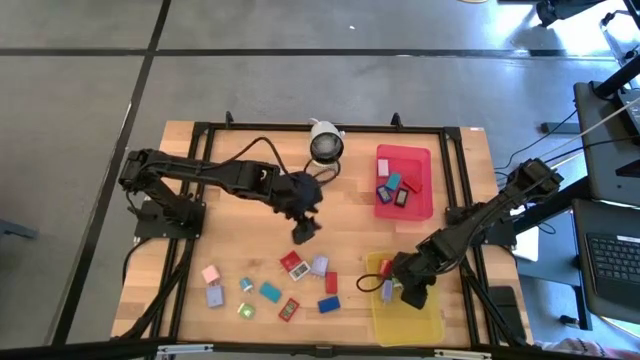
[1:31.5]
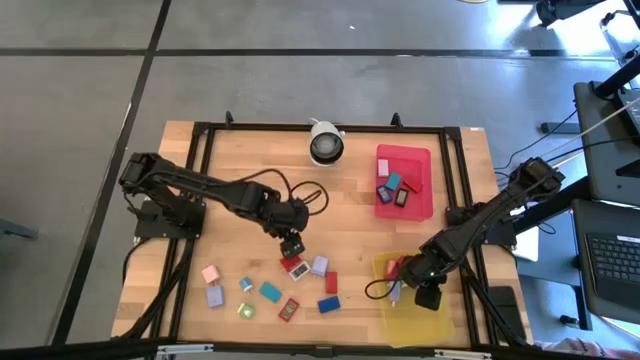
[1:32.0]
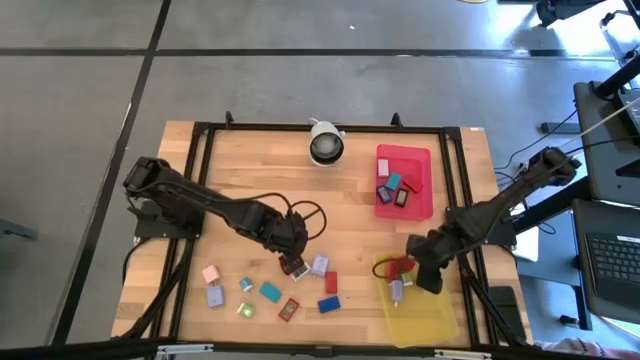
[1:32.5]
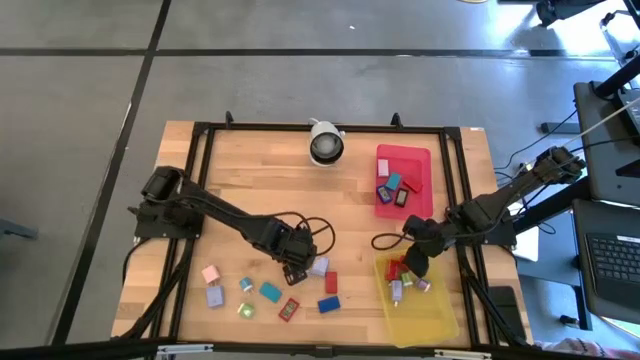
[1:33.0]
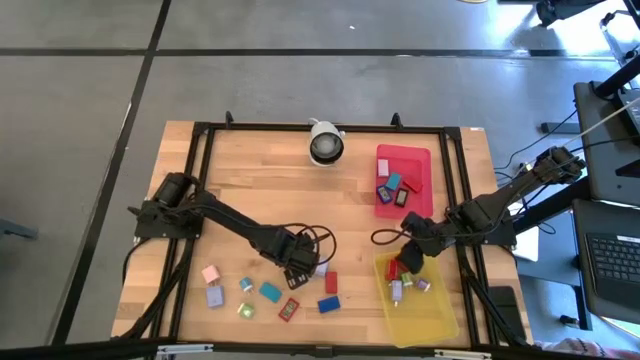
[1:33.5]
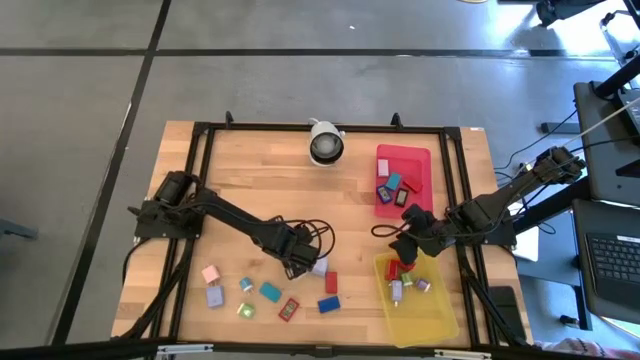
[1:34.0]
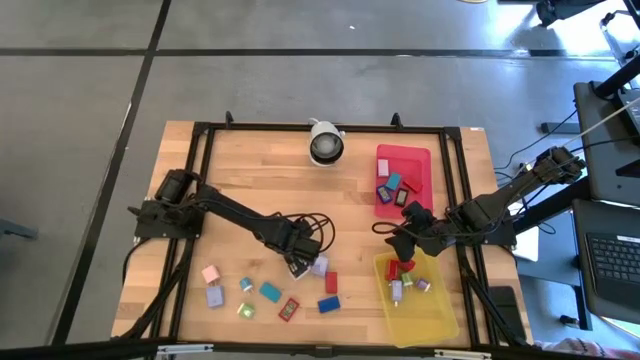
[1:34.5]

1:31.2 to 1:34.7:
Task: Pick & Place Office items
Put the red charger adapter into the yellow bin

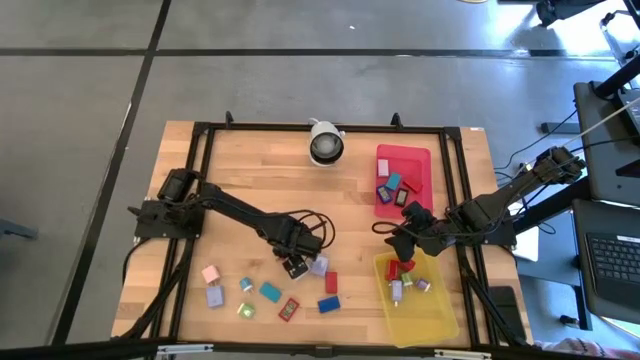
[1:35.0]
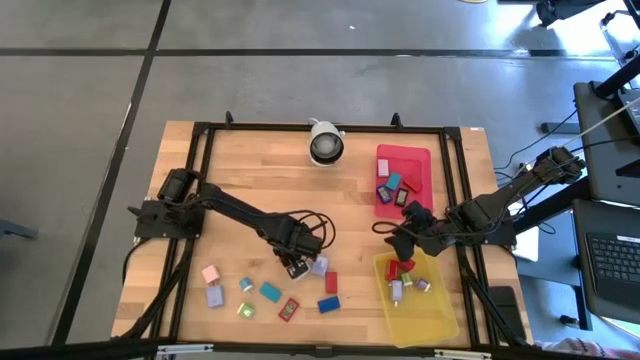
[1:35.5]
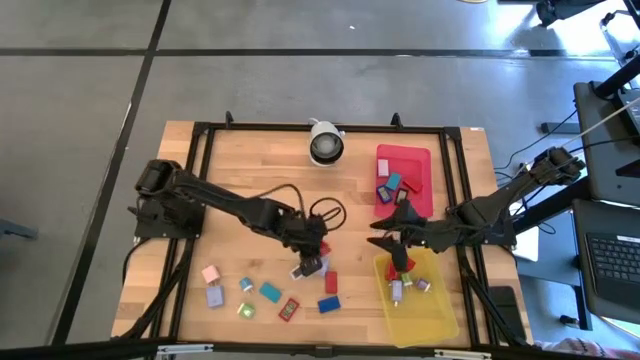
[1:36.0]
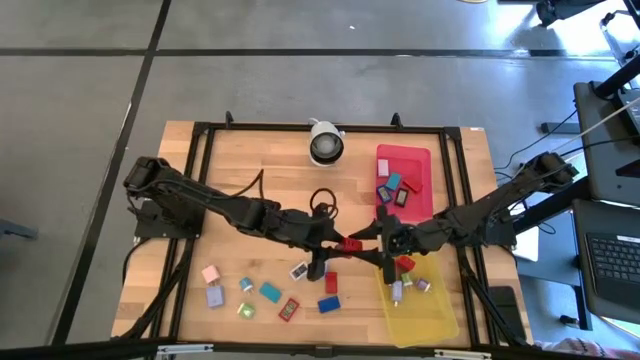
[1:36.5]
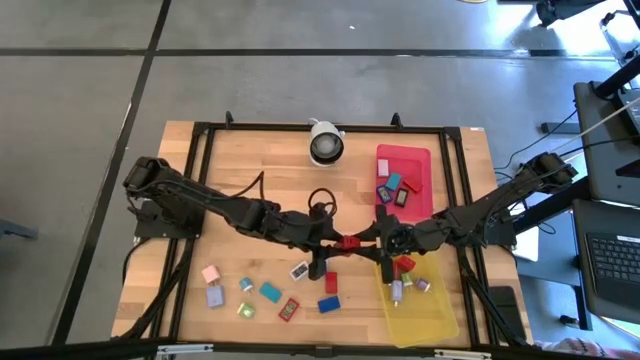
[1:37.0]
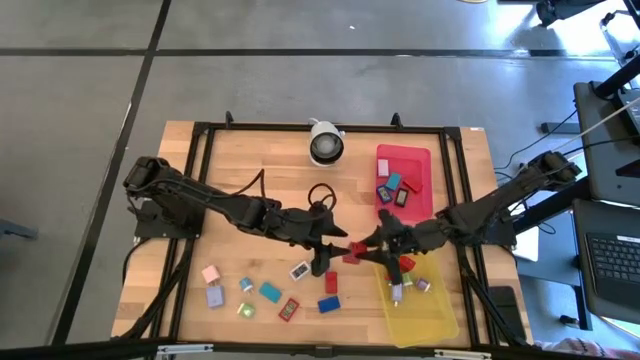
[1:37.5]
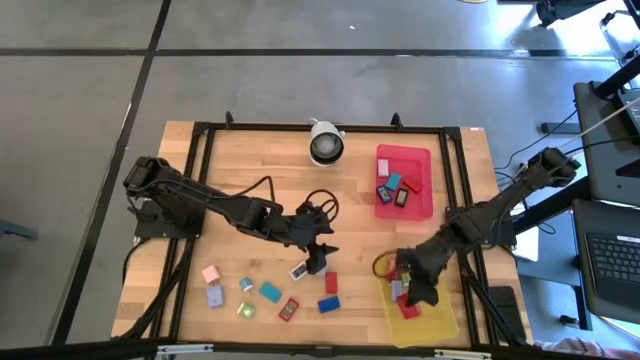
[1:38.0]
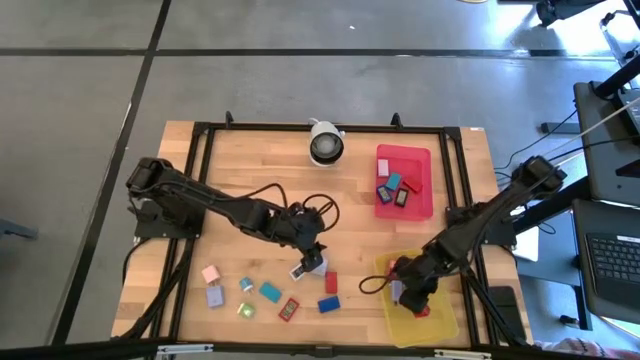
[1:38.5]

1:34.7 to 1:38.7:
Put the red charger adapter into the yellow bin

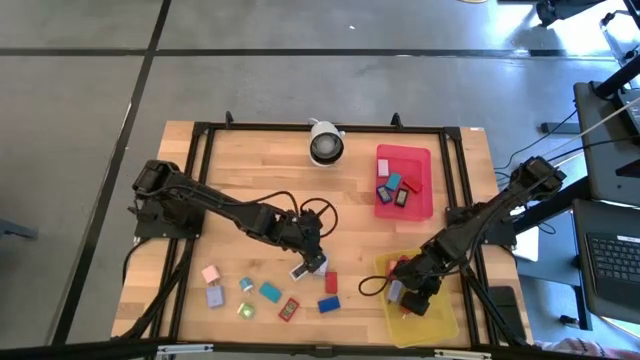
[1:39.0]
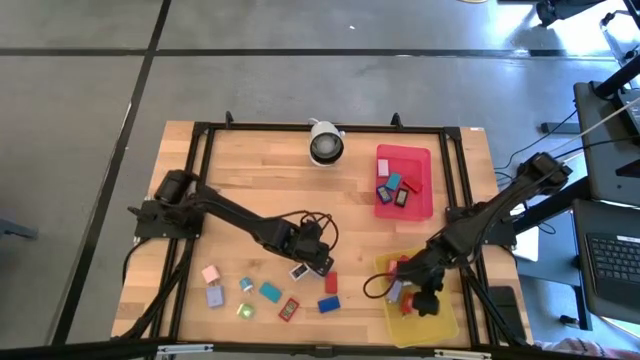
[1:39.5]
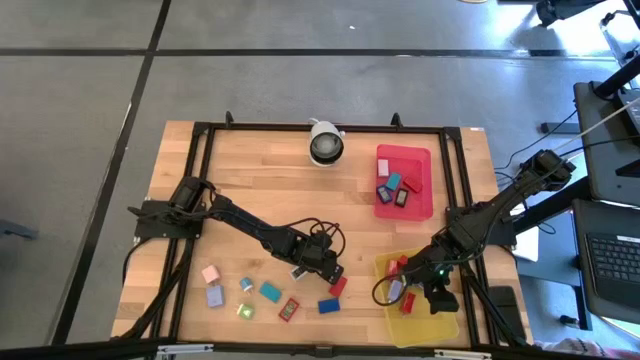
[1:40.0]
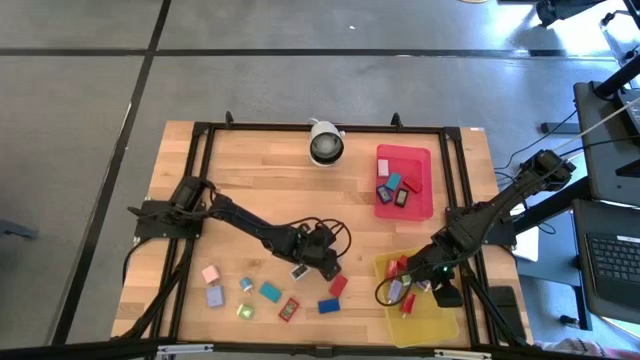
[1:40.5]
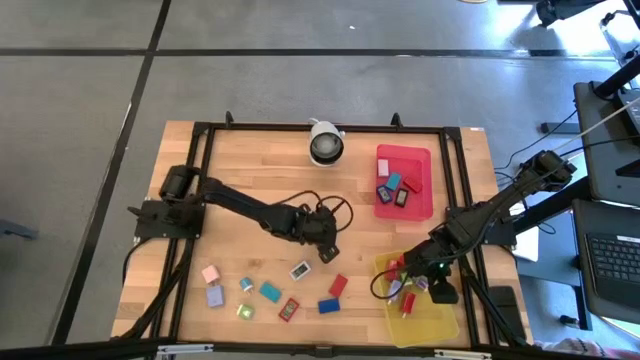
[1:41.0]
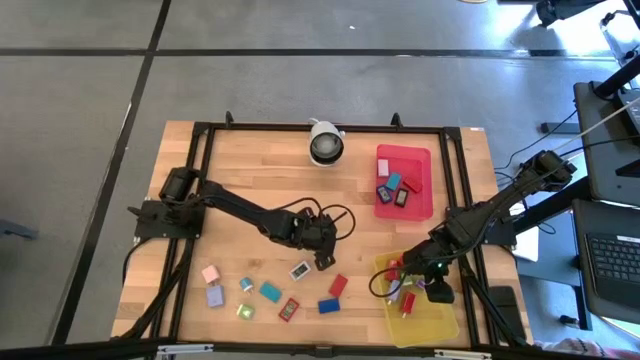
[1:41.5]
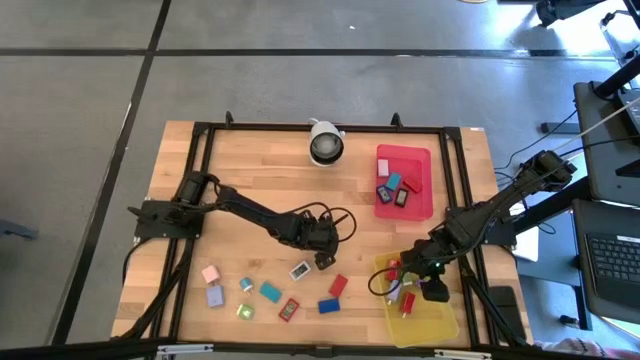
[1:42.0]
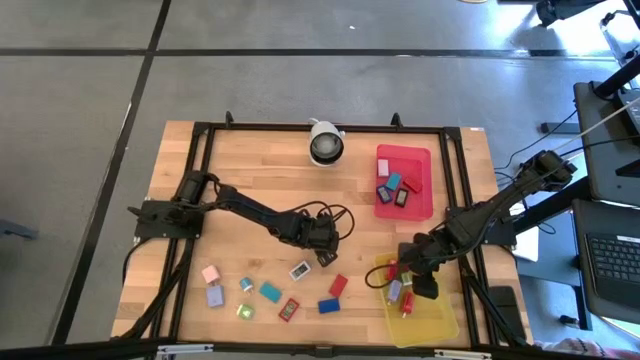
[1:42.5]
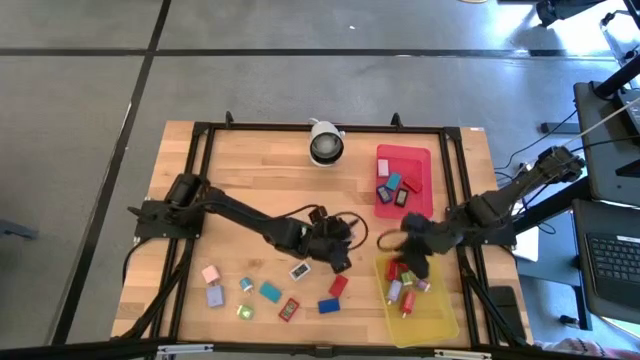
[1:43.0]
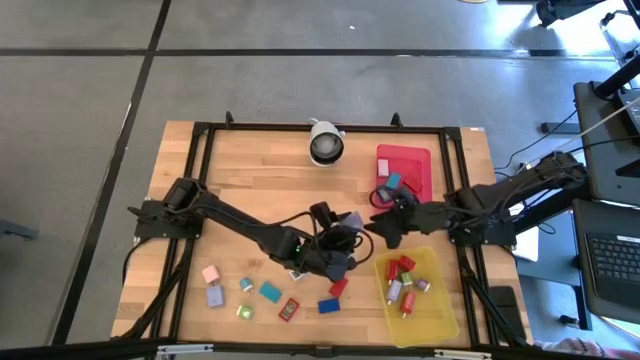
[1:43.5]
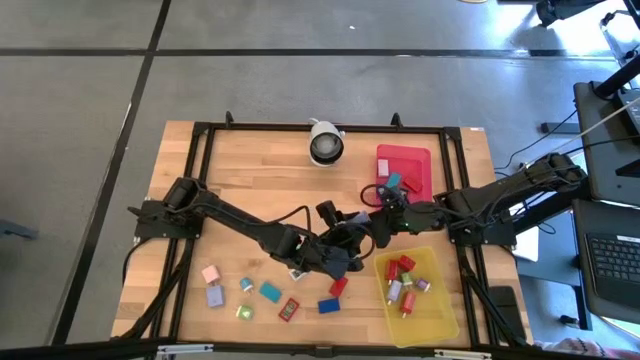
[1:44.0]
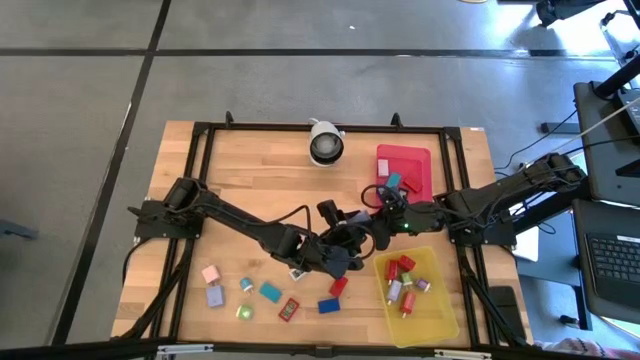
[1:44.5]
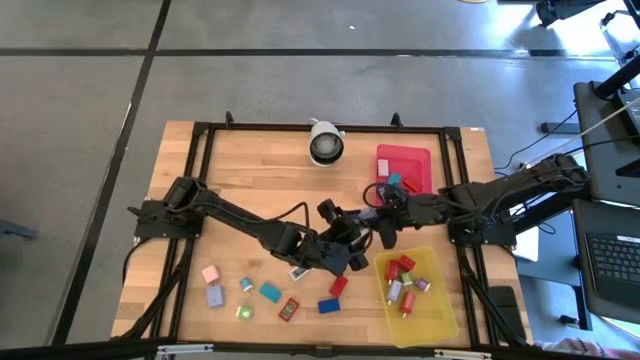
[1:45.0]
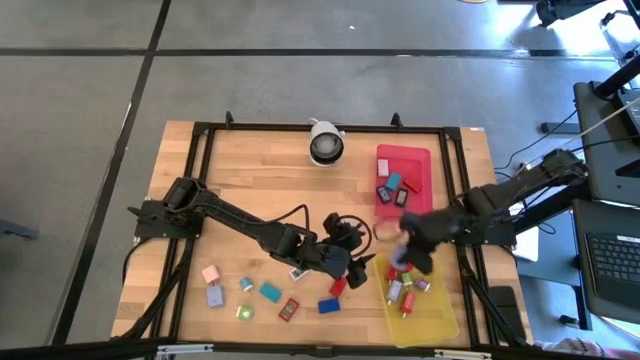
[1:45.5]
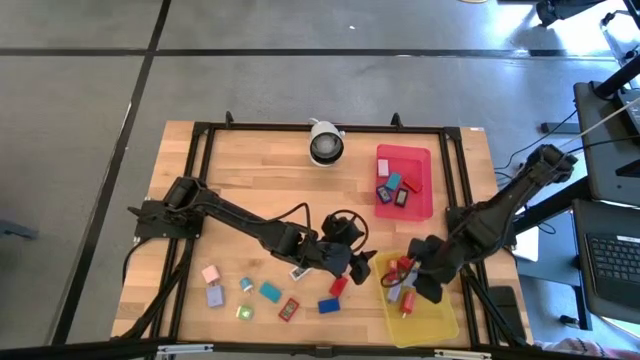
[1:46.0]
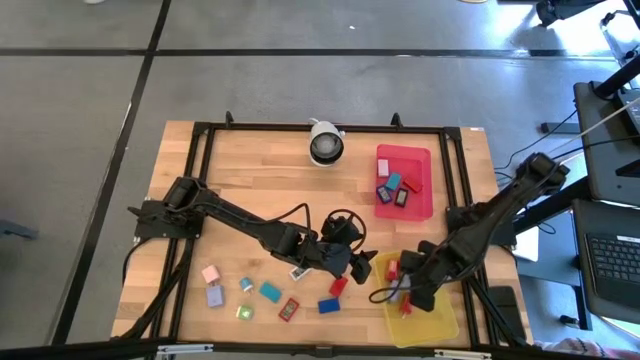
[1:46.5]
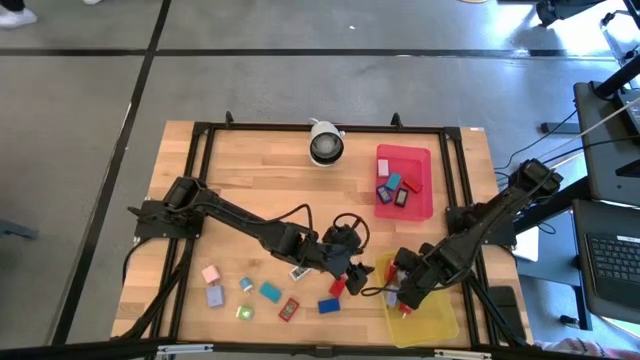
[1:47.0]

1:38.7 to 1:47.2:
Put the right purple charger adapter into the yellow bin

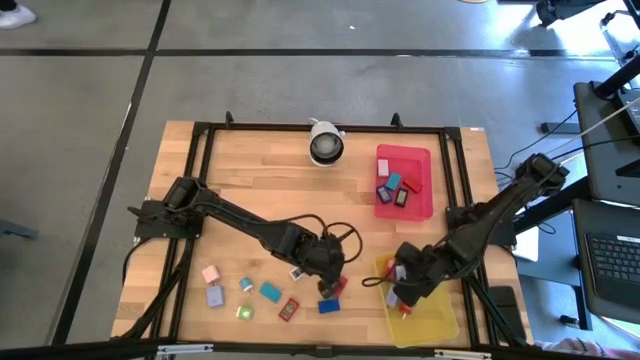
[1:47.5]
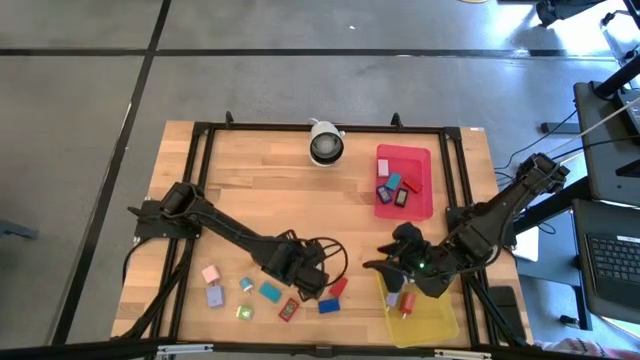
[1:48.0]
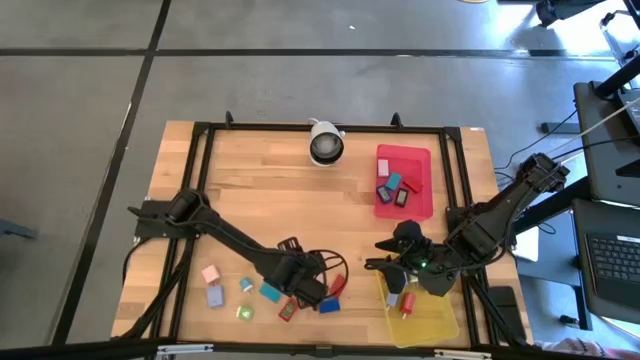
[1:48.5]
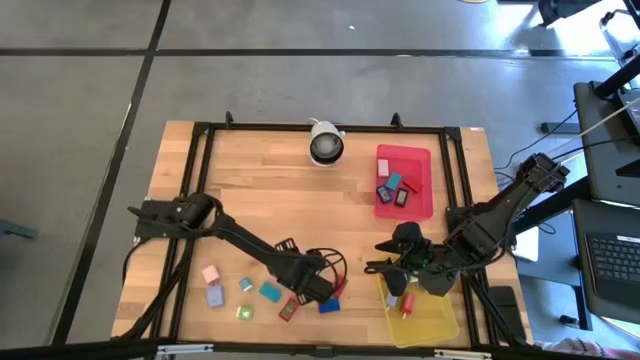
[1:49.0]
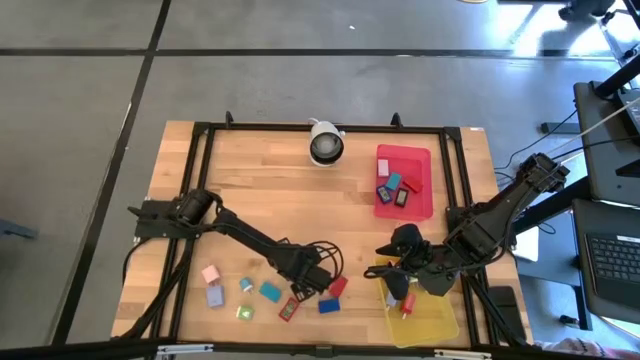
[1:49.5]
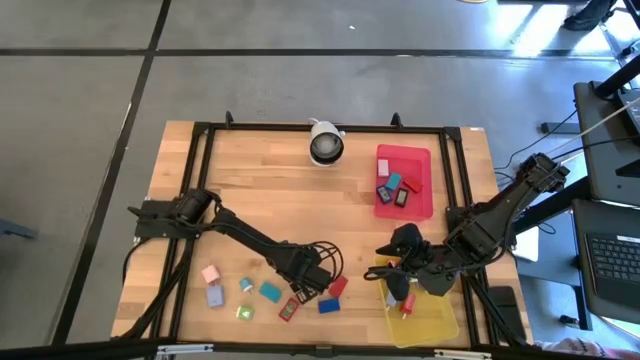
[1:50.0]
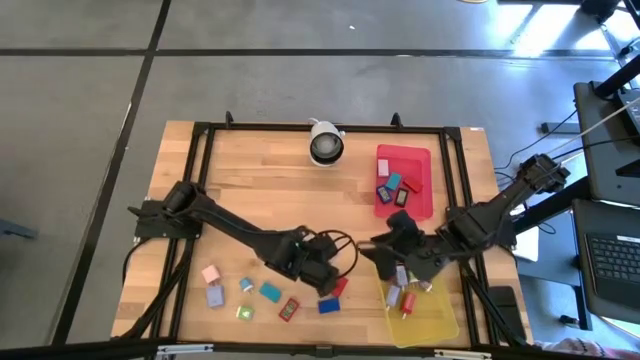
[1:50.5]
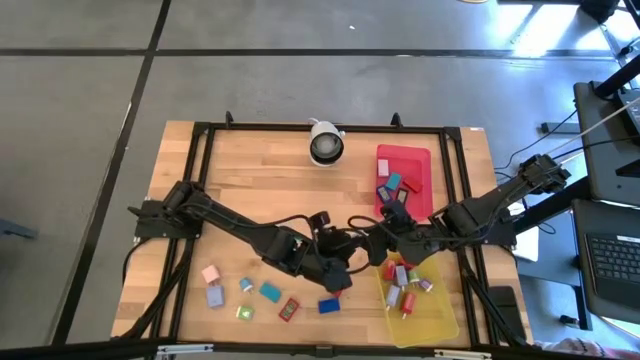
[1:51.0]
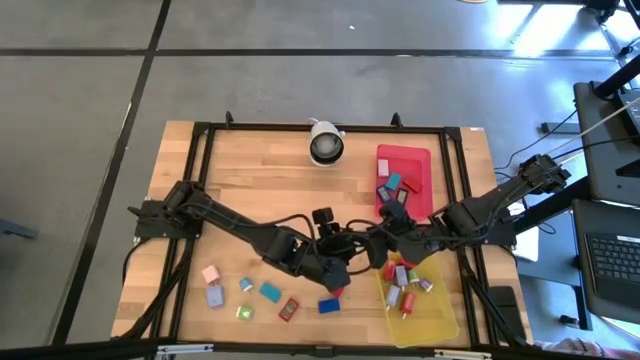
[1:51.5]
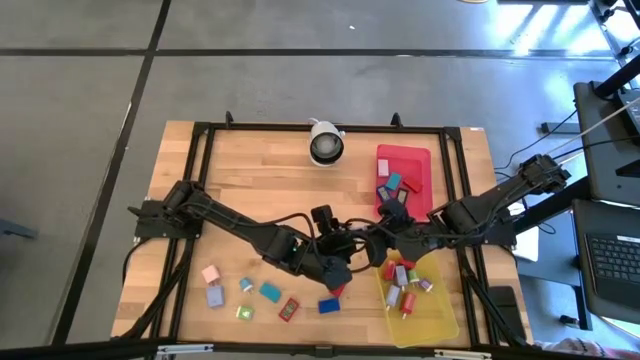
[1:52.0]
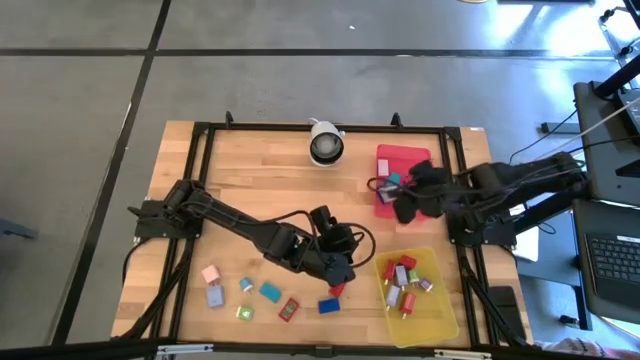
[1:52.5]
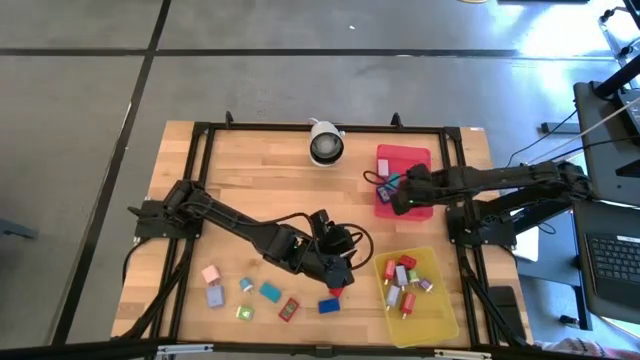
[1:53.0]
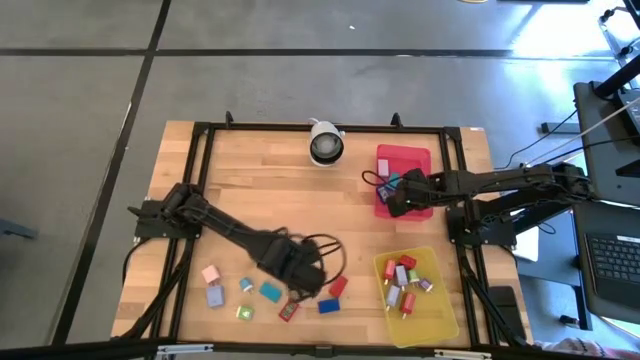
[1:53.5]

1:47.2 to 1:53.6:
Put the white digital timer into the pink bin
